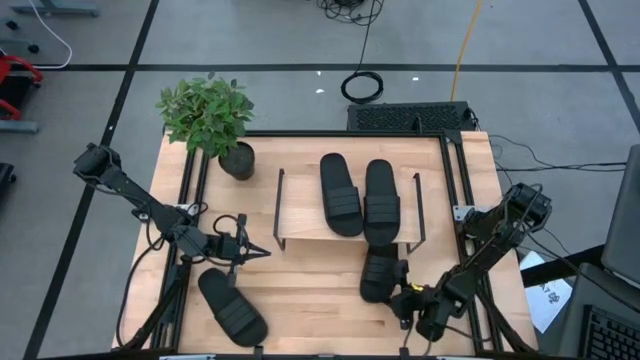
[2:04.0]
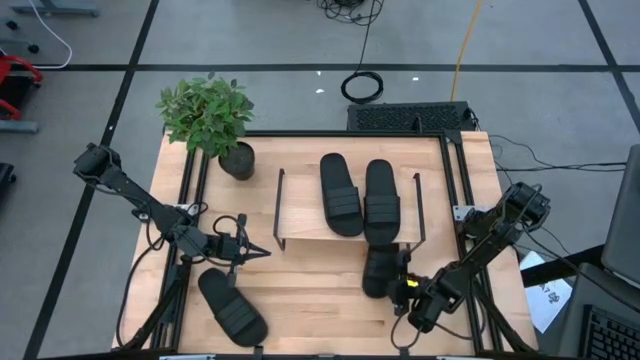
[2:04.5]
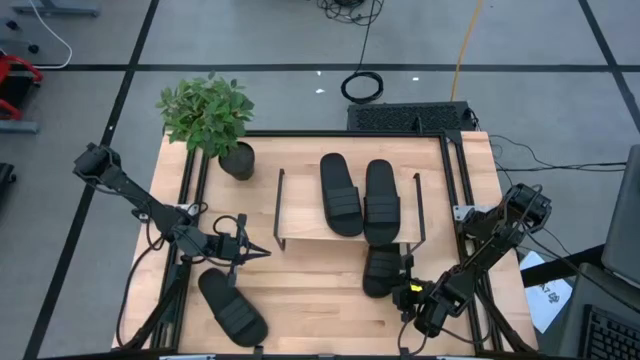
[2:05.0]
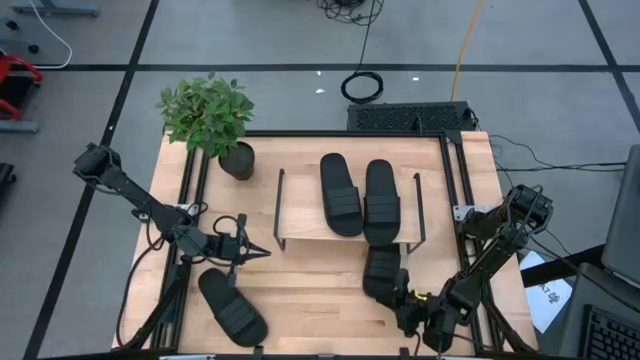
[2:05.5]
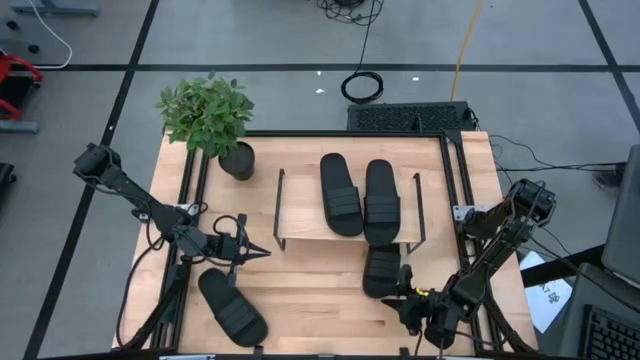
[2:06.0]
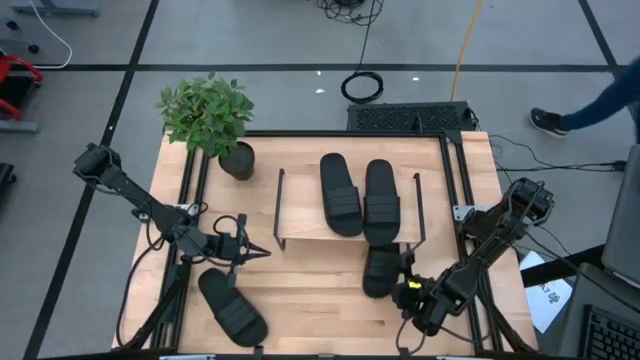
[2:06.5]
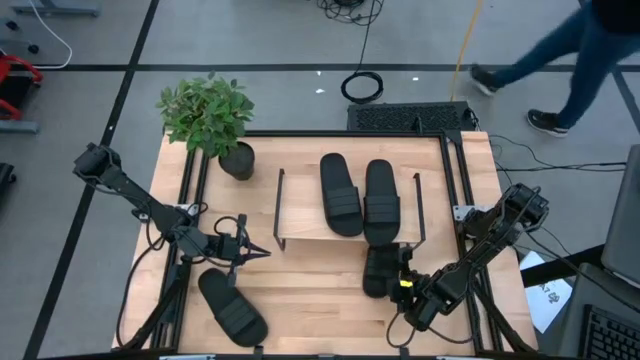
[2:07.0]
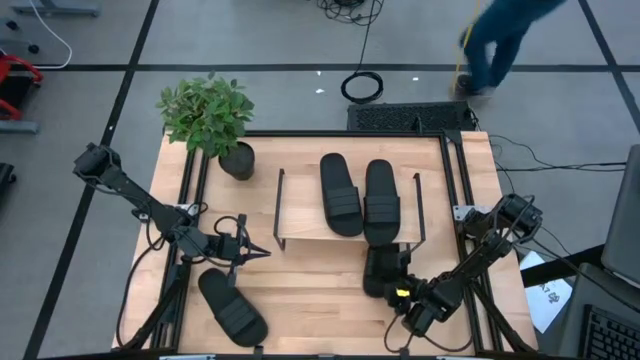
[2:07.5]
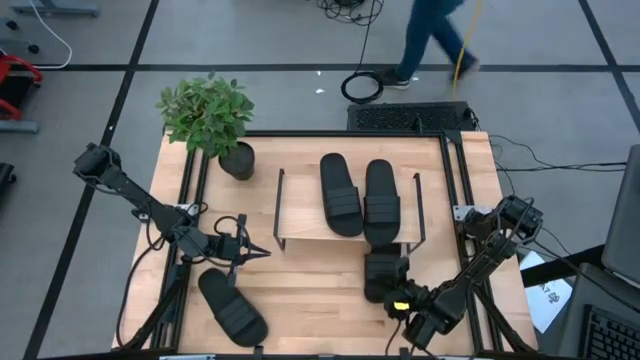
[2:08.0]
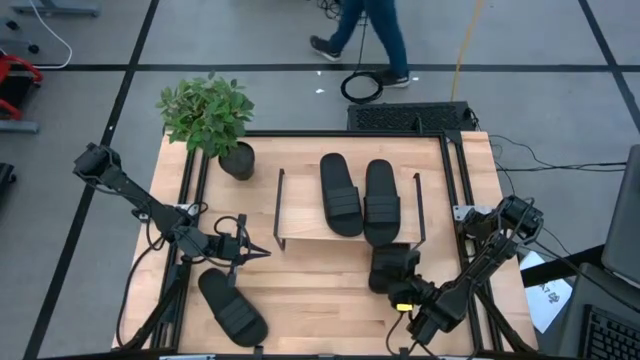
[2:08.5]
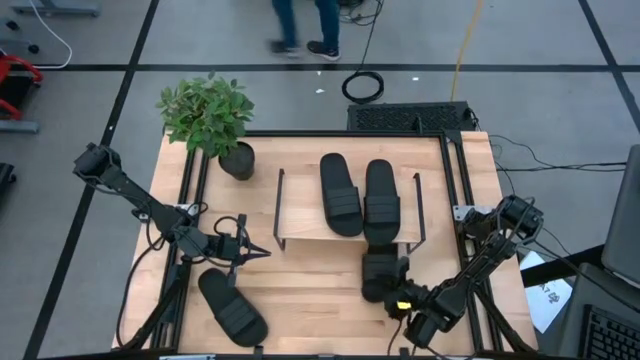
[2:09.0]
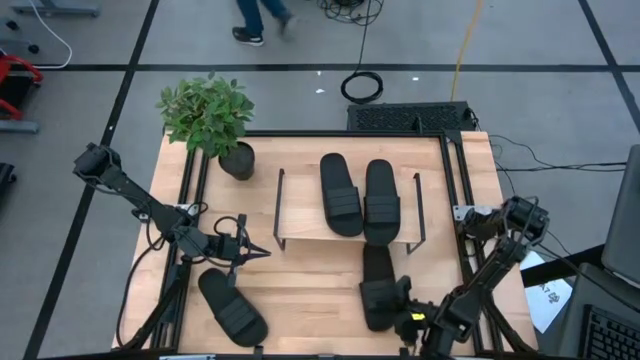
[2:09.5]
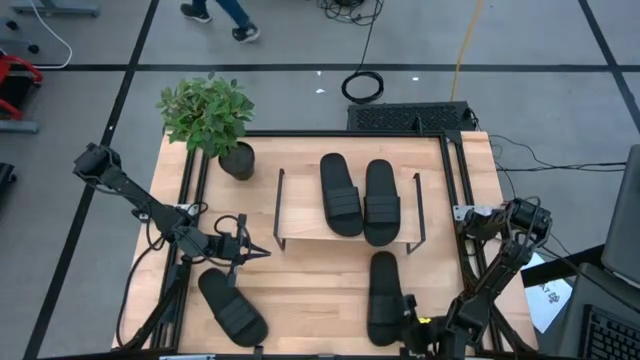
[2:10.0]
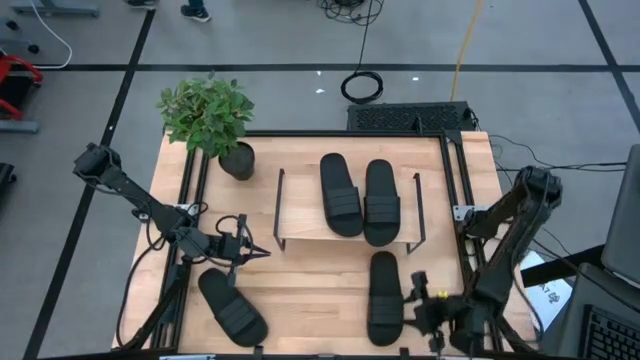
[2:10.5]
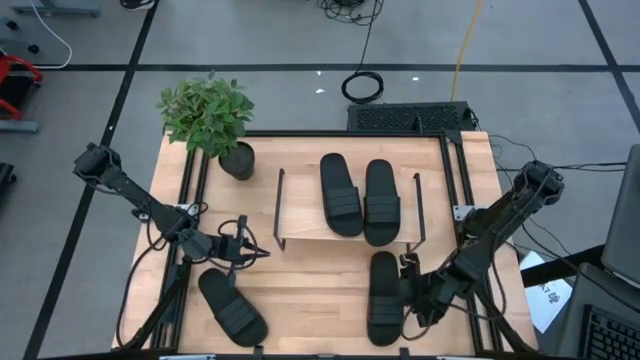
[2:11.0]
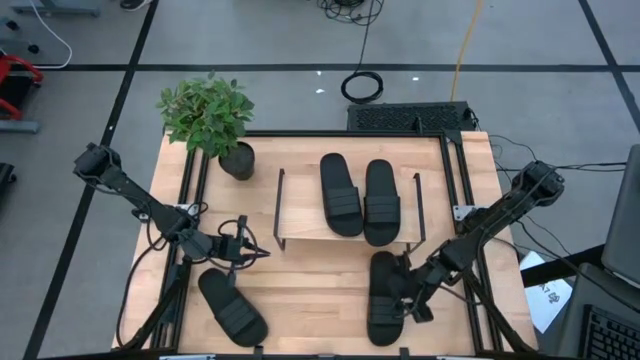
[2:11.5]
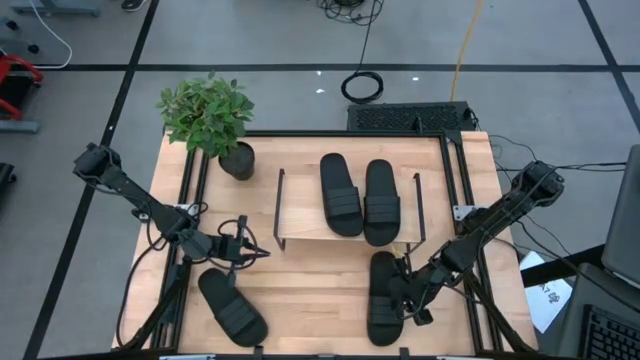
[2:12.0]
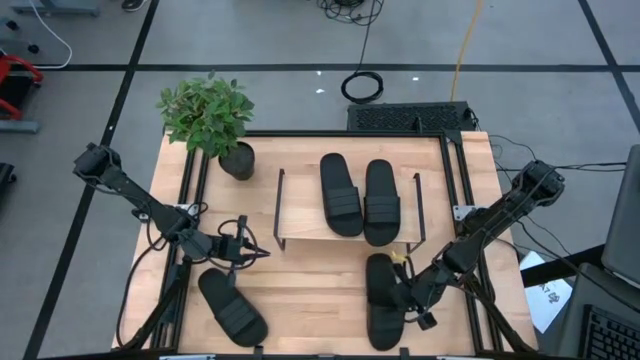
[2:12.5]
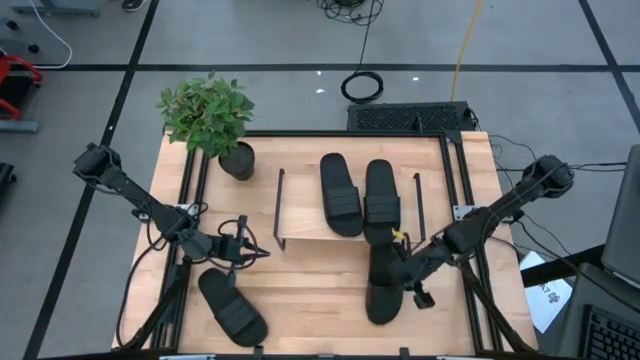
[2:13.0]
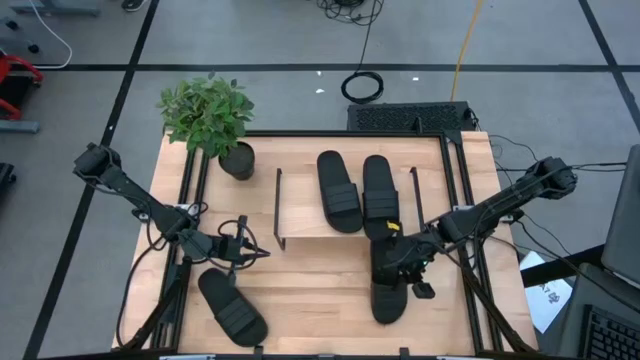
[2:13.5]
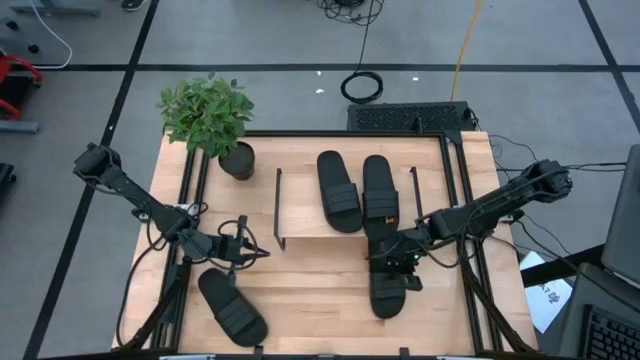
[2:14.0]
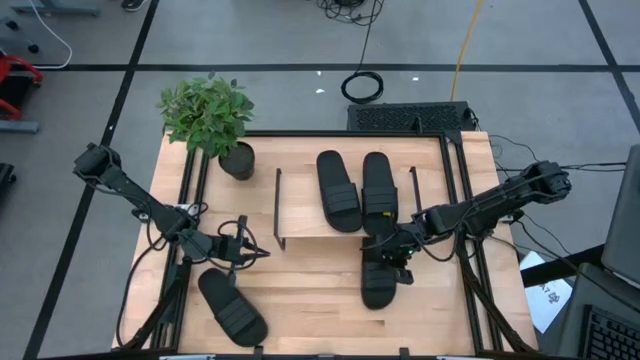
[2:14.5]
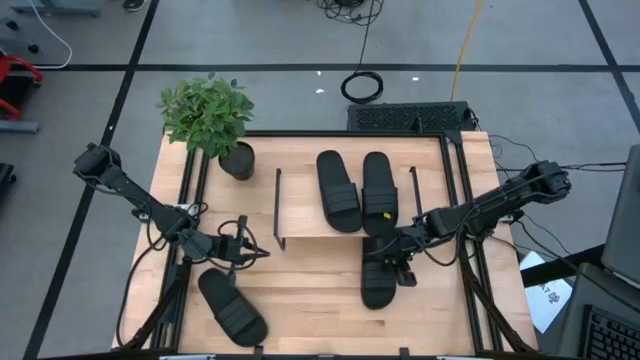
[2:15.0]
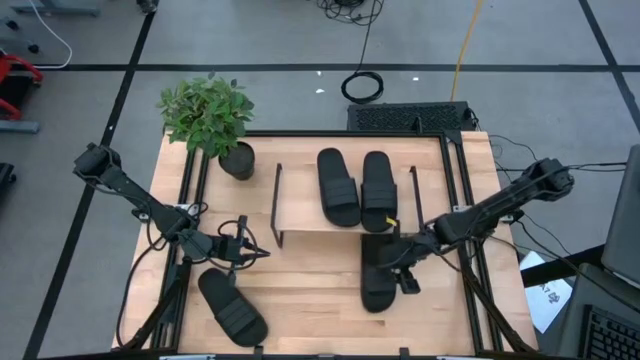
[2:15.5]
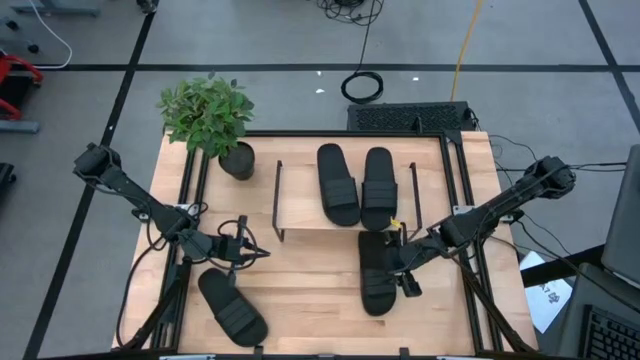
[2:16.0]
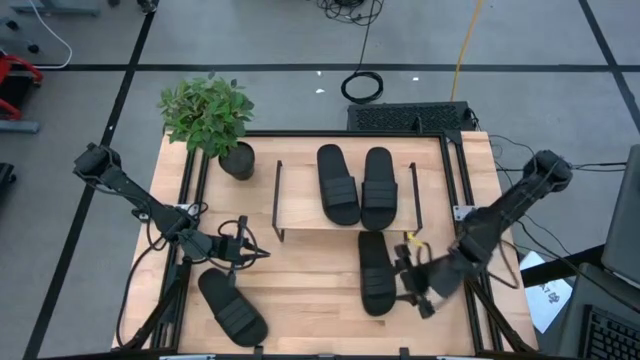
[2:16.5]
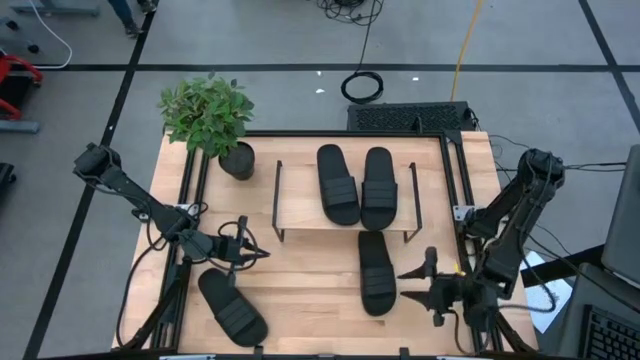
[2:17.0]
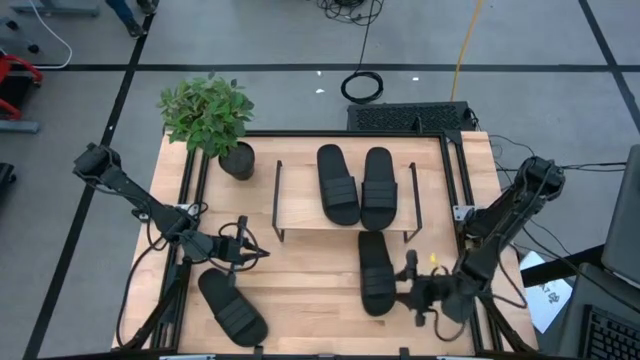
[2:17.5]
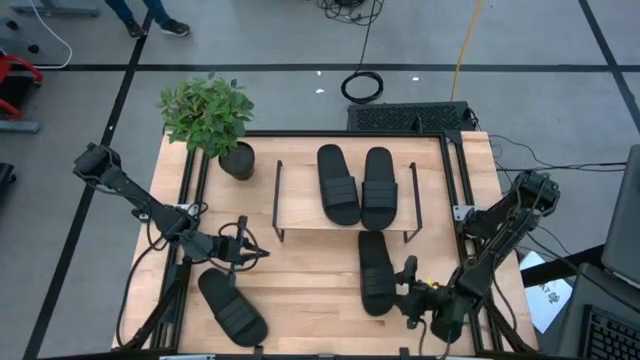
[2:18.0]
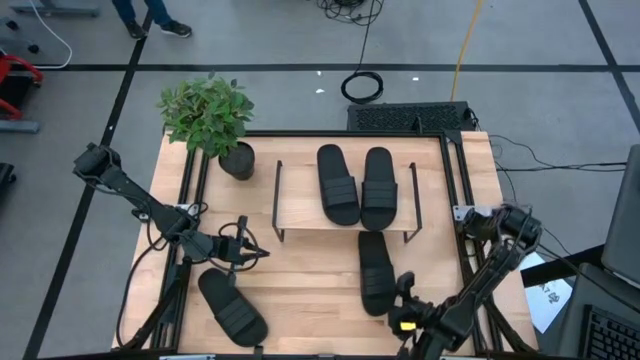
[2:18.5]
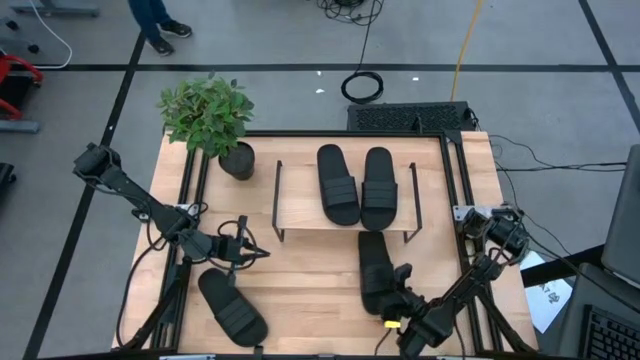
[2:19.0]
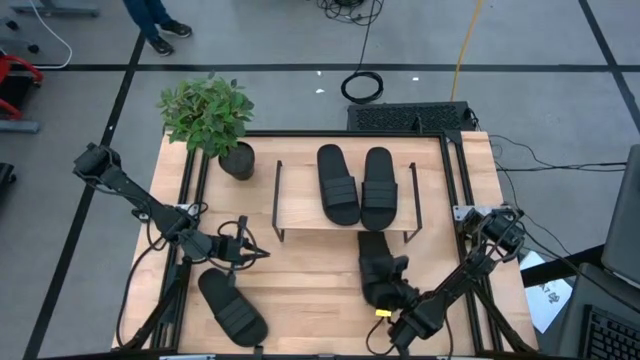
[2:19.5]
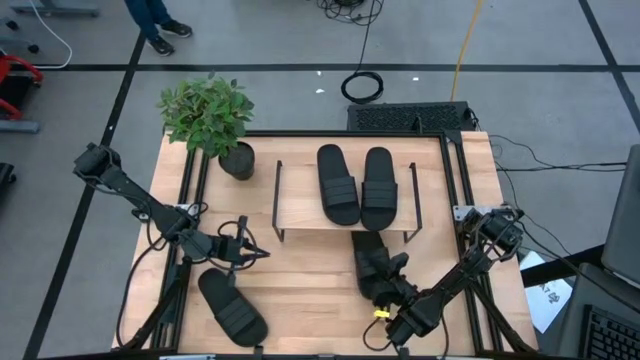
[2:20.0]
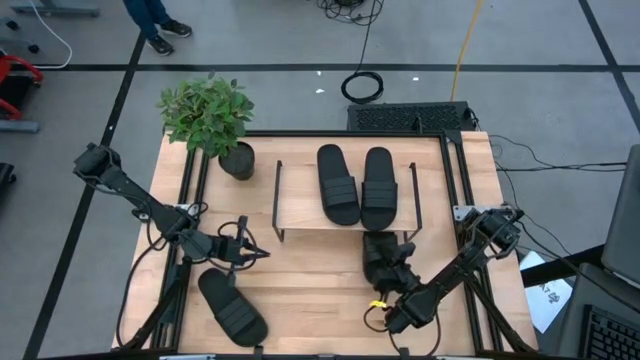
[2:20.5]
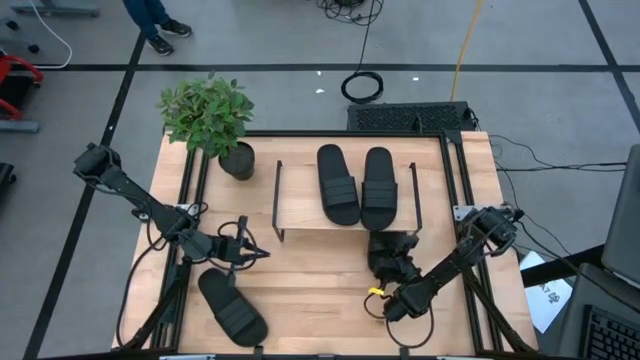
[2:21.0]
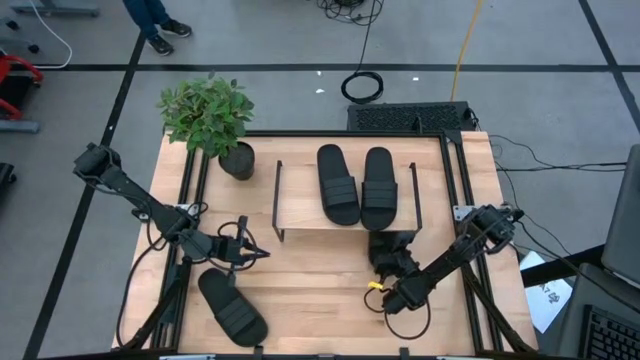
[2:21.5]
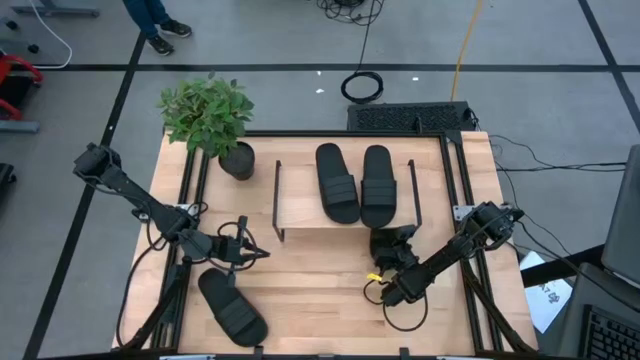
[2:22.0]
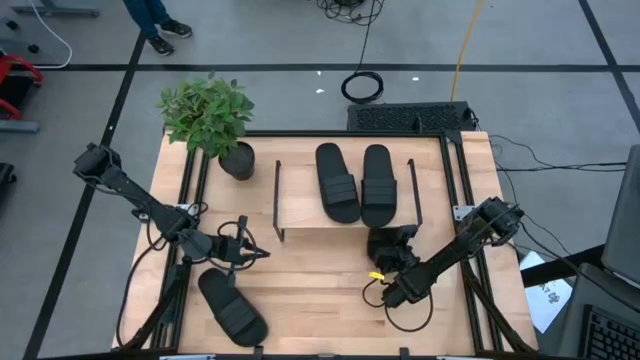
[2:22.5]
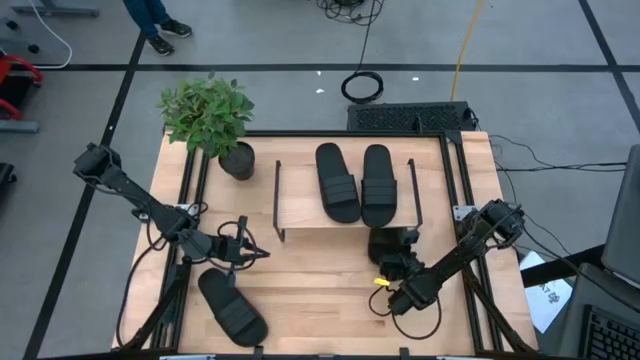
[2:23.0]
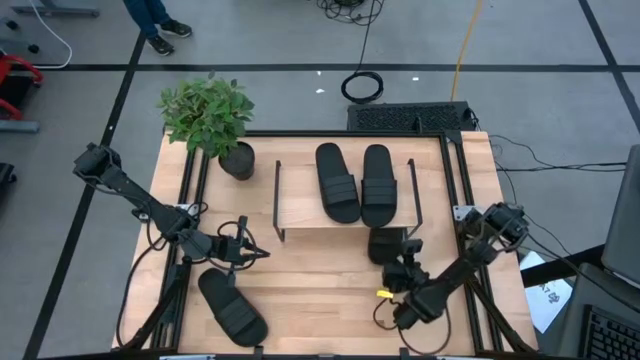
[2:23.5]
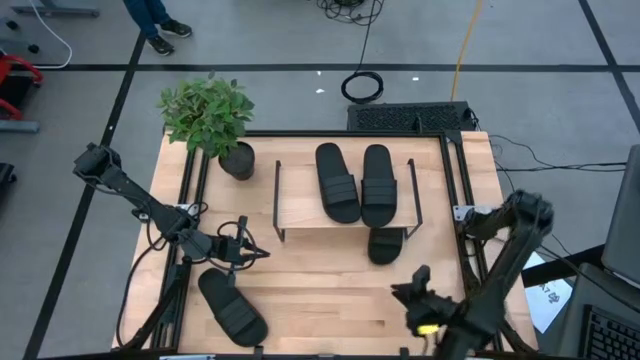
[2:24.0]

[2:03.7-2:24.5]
Task: Pick and place slides into the shelf
Put the black slide under the shelf
